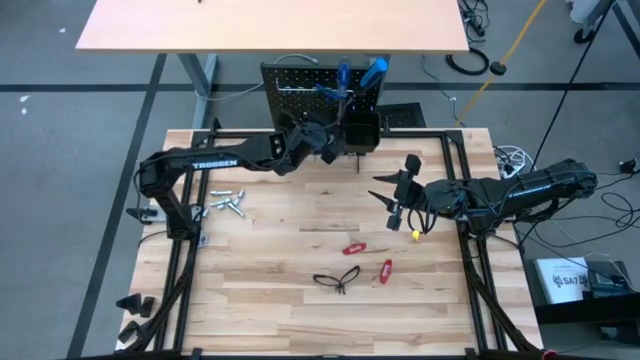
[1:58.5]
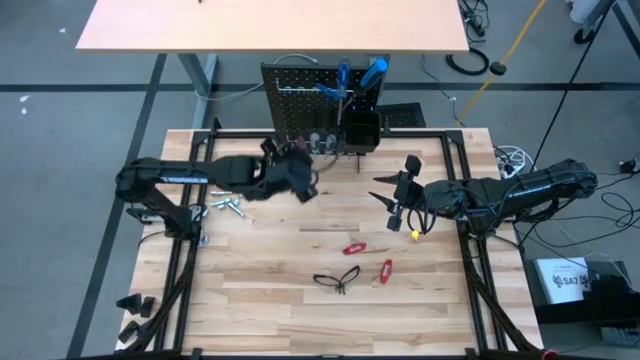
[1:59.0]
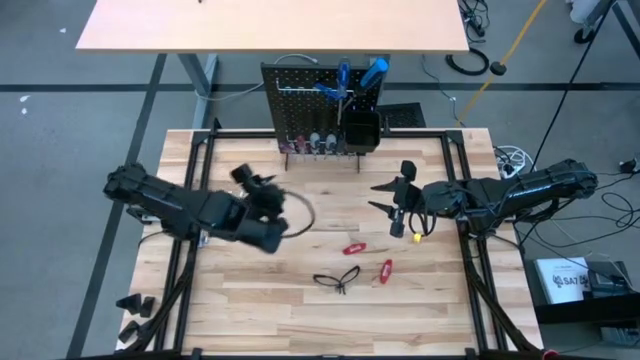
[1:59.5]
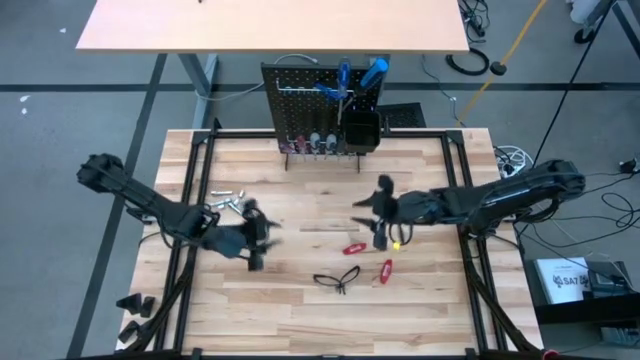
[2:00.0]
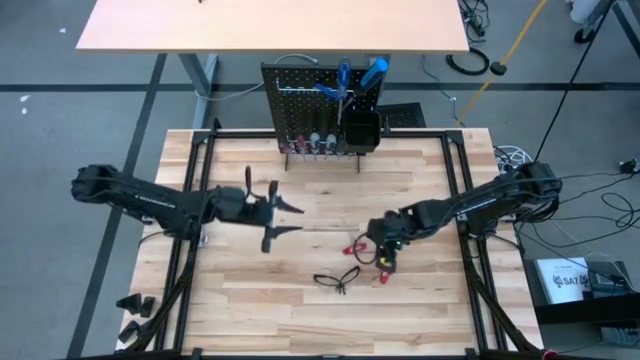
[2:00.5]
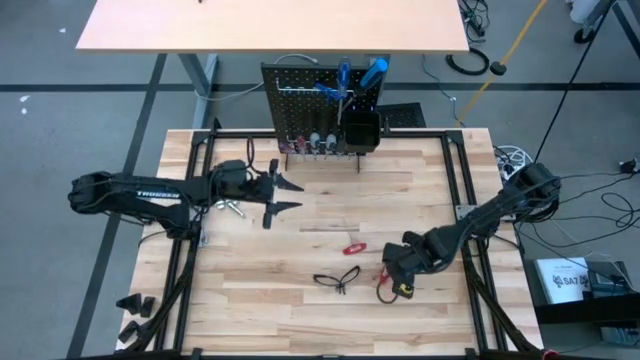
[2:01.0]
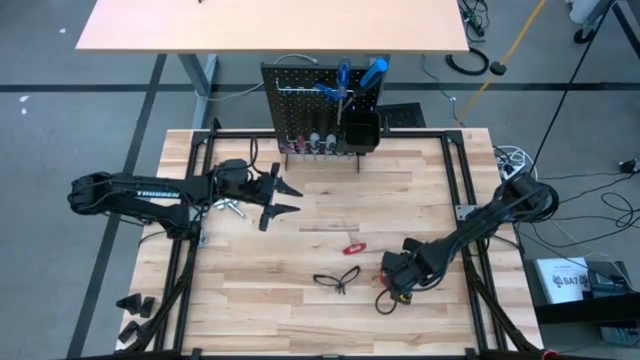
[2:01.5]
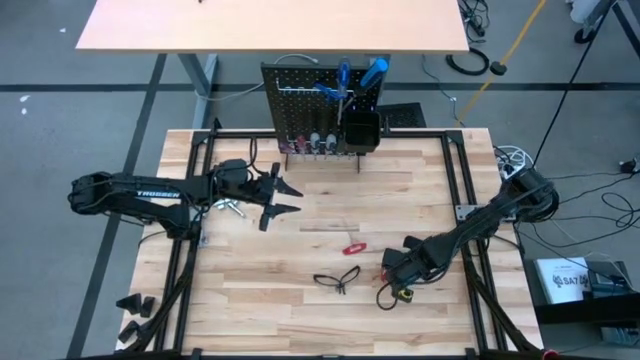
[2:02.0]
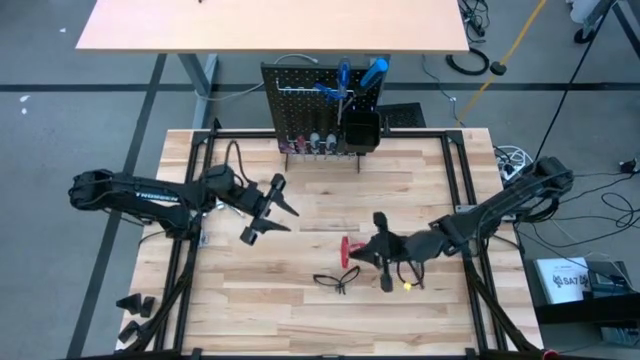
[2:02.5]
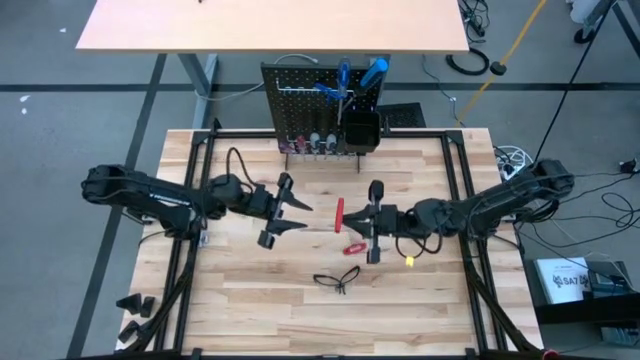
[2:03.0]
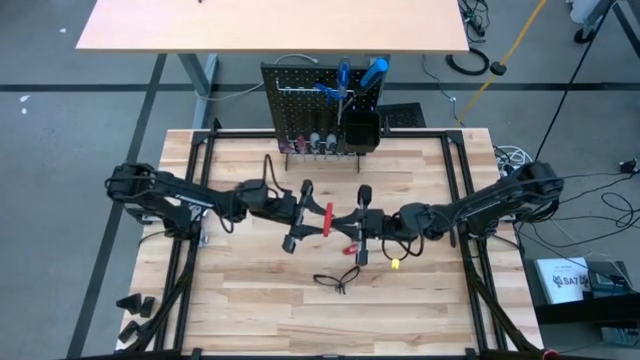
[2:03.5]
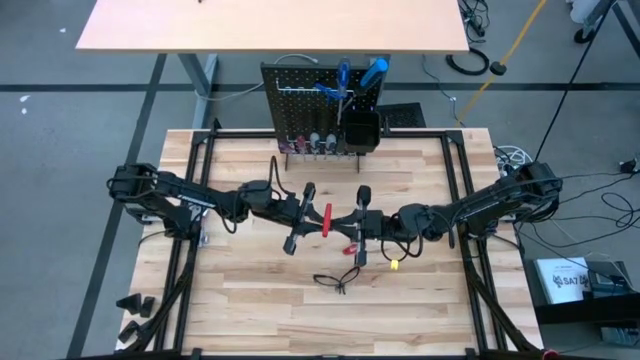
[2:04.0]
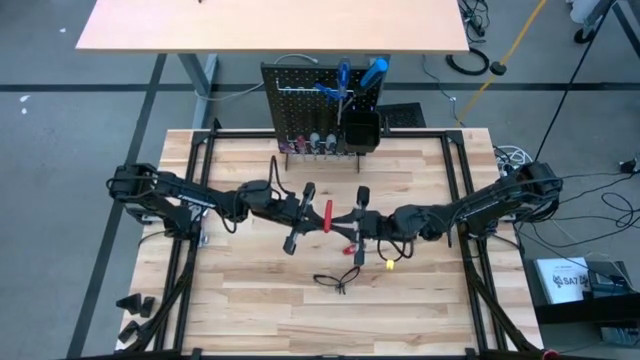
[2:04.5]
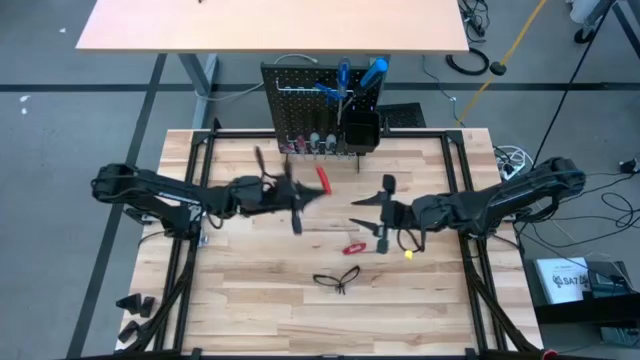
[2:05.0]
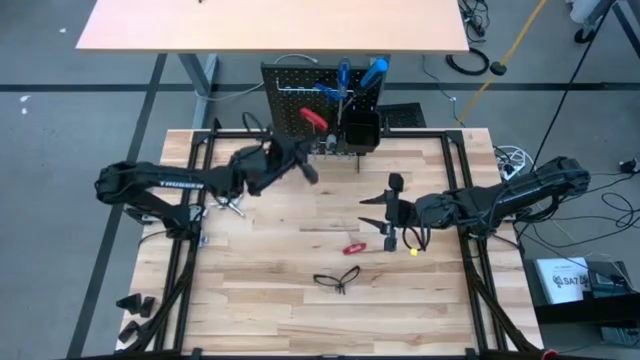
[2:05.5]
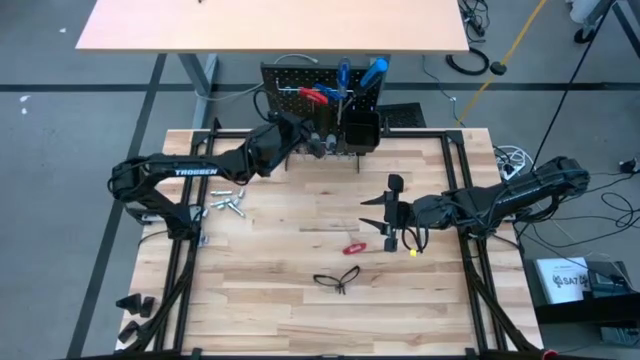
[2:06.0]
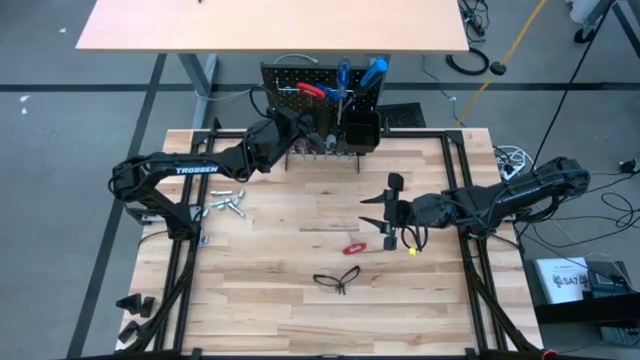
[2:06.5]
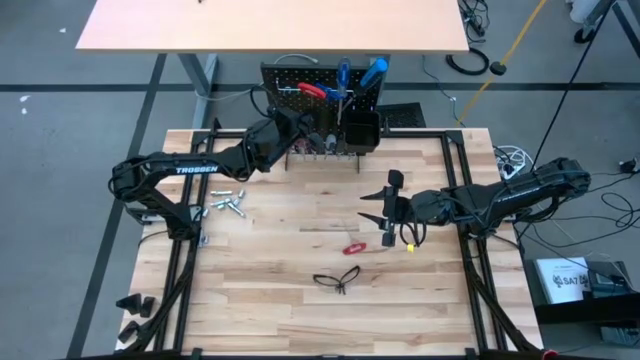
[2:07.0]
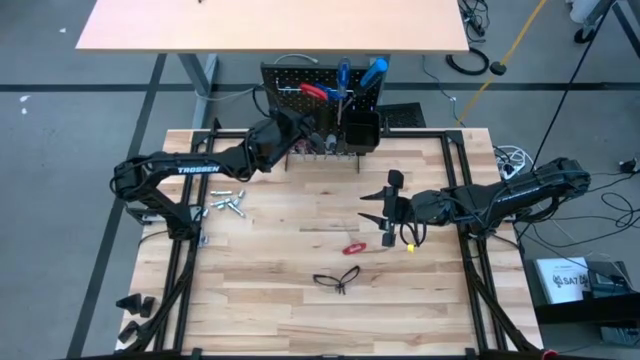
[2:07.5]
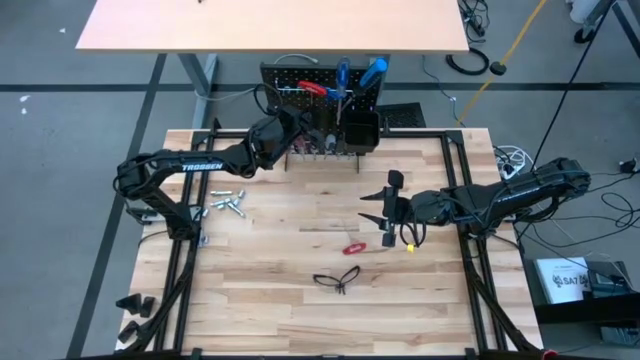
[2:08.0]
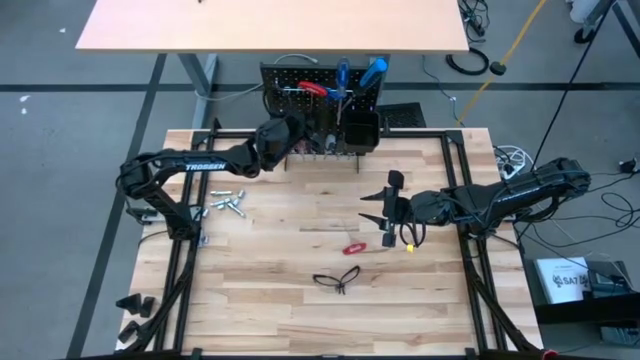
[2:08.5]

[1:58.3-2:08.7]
Task: Hang tools onto peg board
Hang the red allen wrench onto the peg board

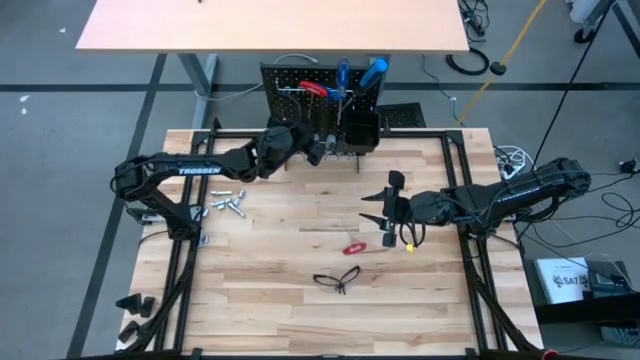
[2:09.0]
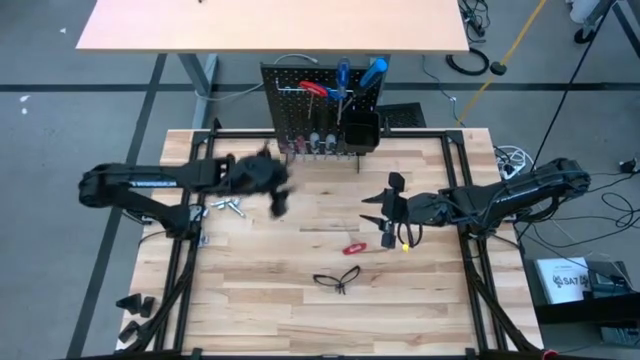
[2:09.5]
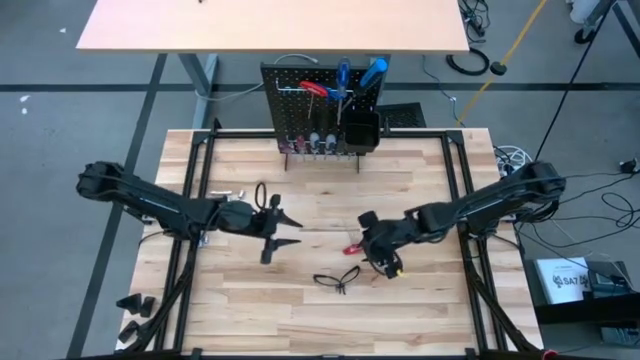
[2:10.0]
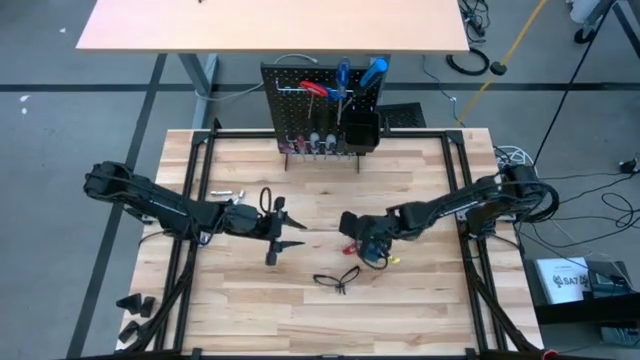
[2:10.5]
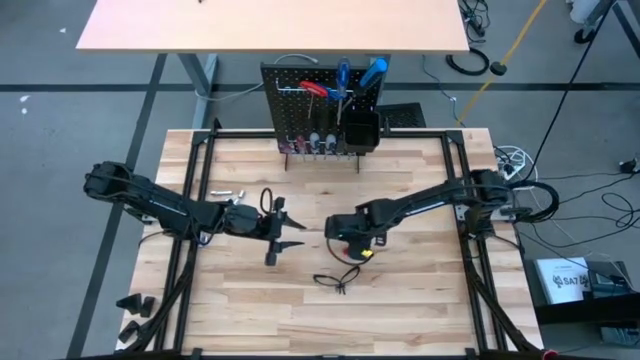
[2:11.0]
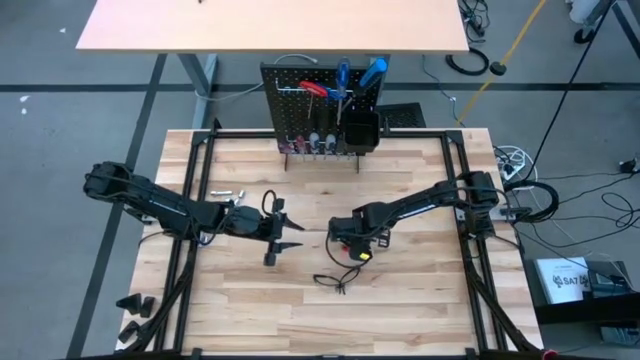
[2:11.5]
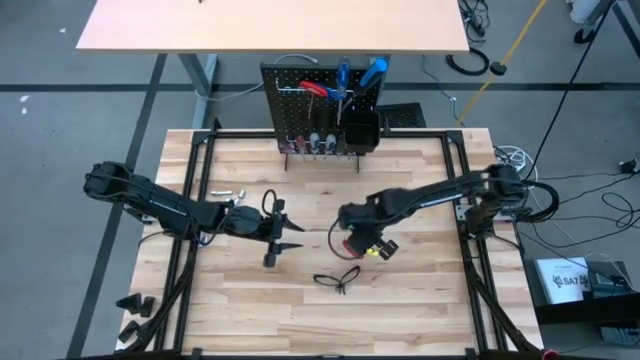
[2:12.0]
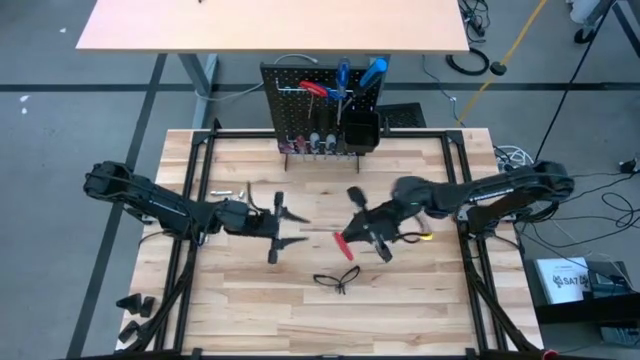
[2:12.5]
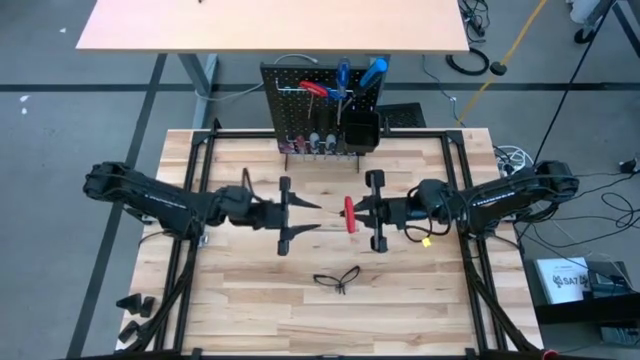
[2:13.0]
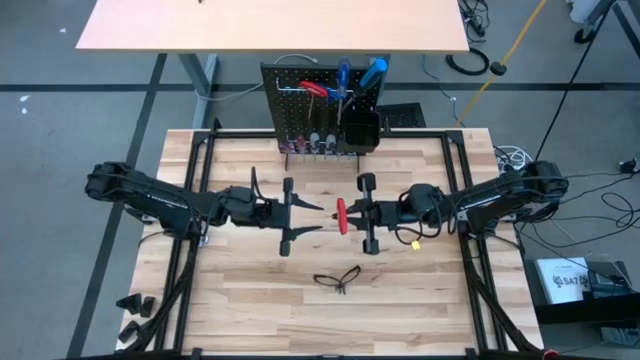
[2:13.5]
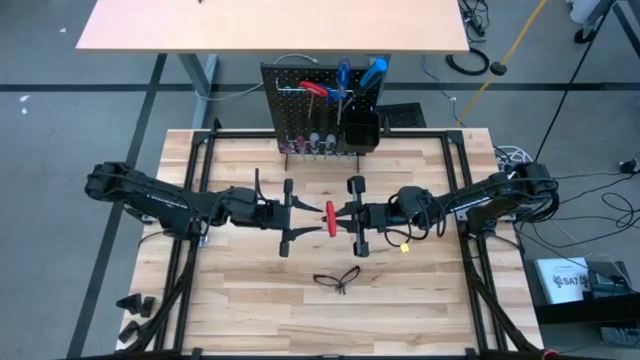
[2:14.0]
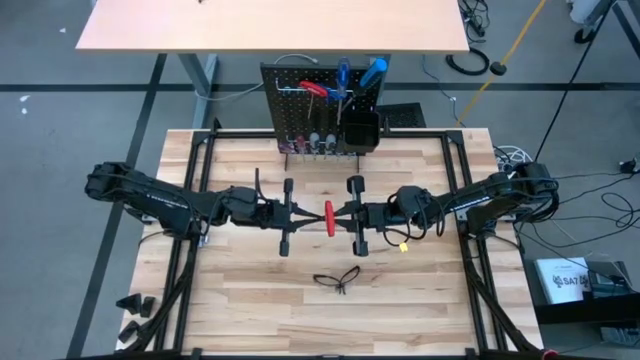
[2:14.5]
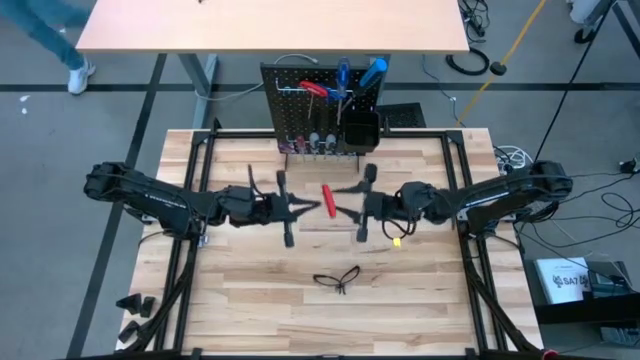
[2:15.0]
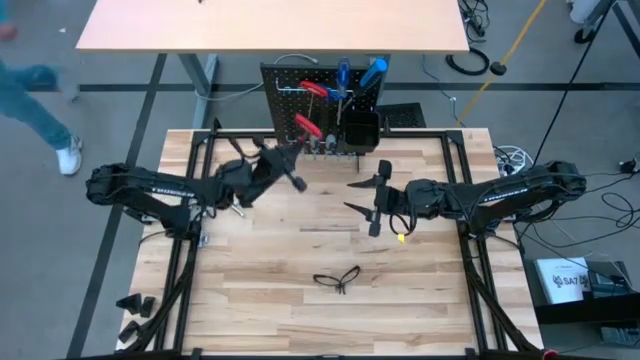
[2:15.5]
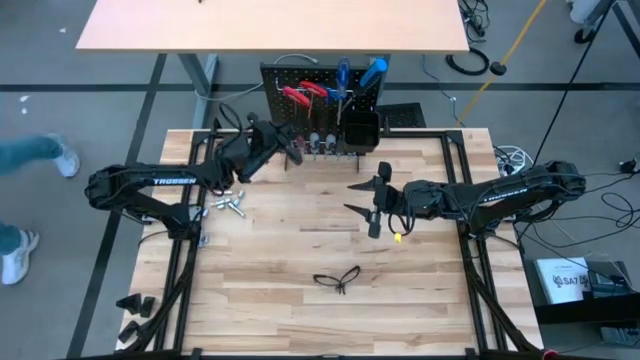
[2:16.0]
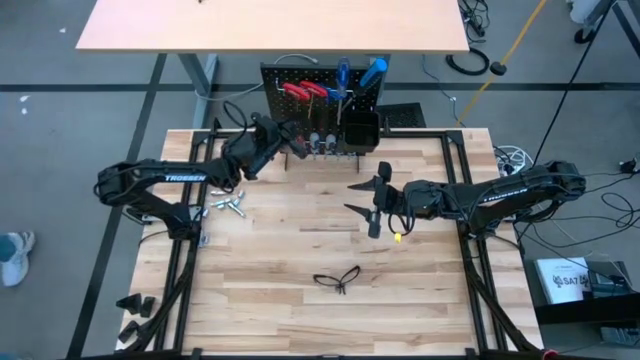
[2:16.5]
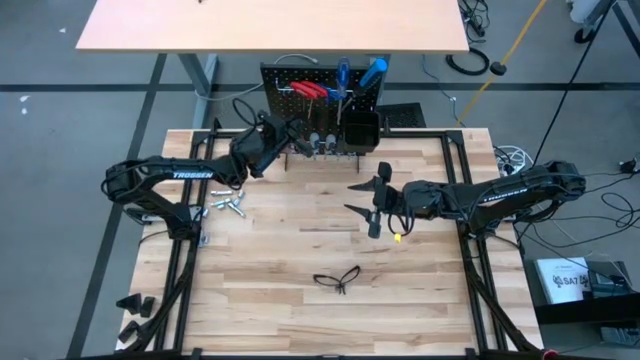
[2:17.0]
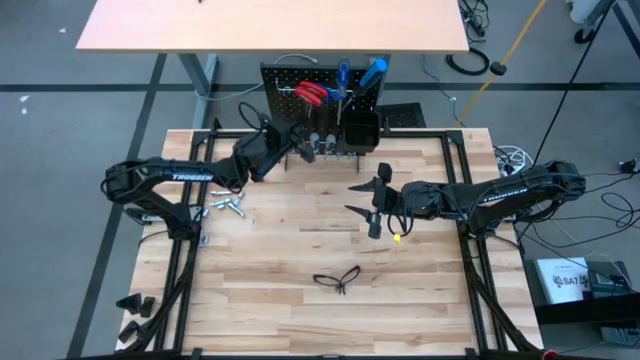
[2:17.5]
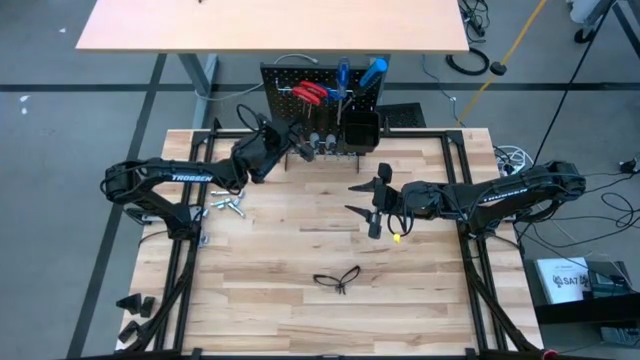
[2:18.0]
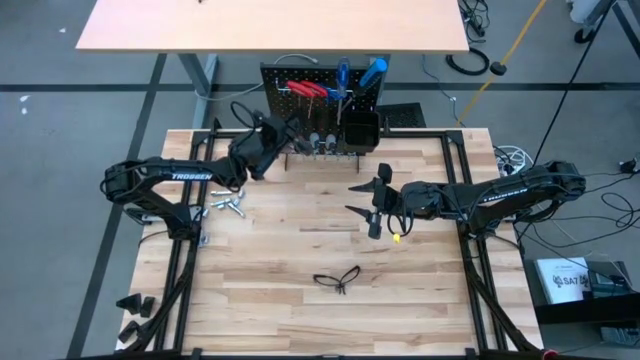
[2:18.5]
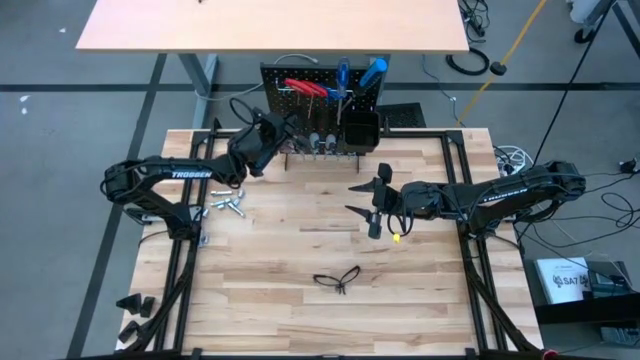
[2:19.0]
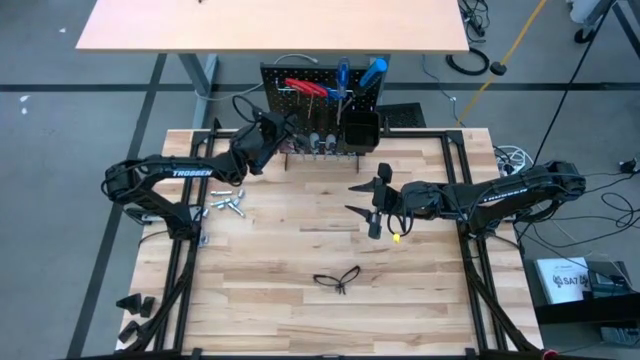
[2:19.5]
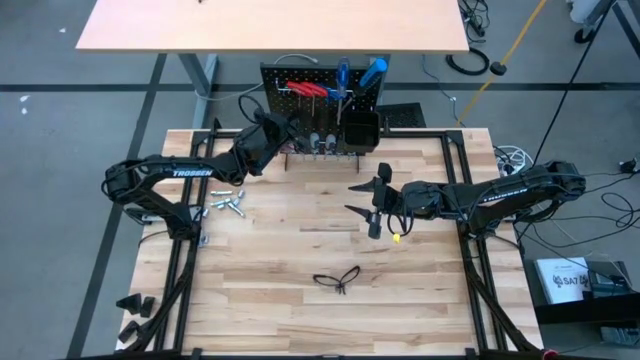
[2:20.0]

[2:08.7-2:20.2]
Hang the red allen wrench onto the peg board
